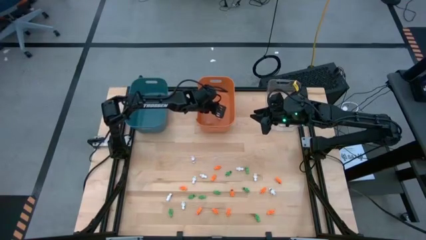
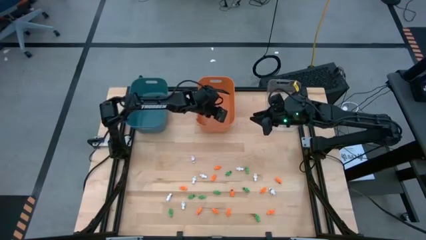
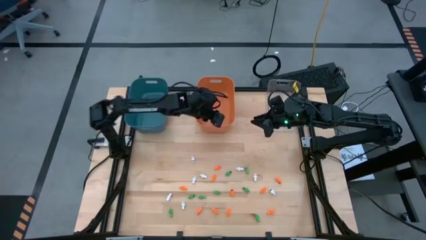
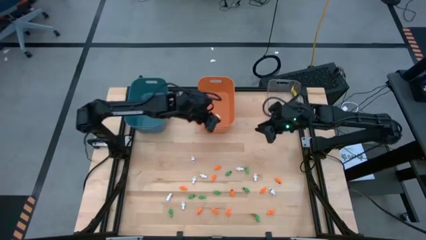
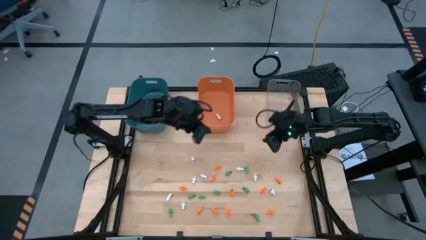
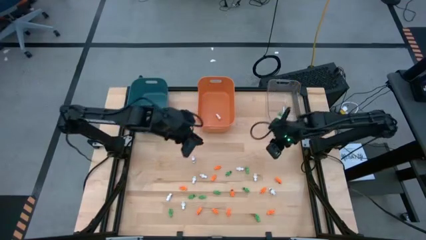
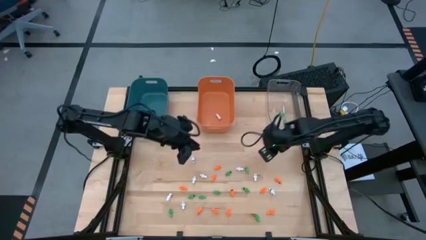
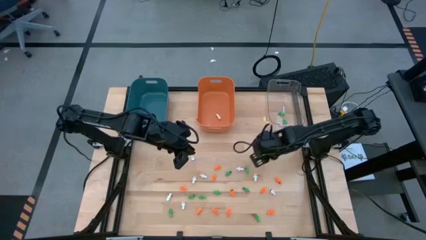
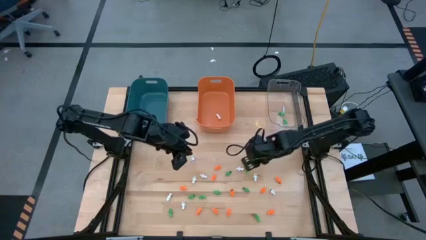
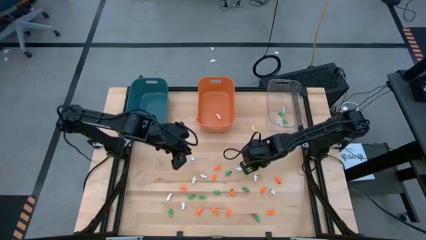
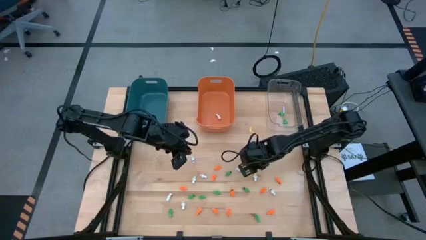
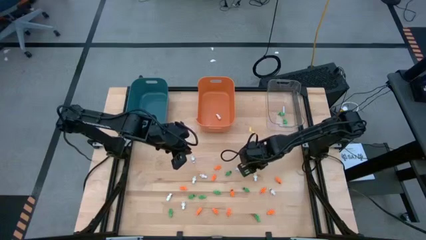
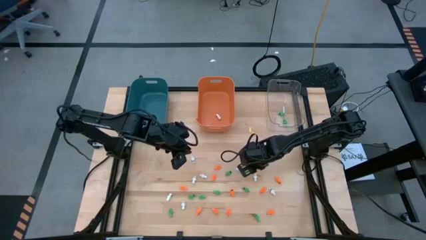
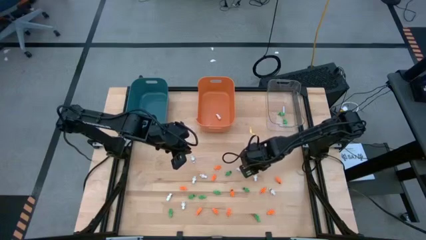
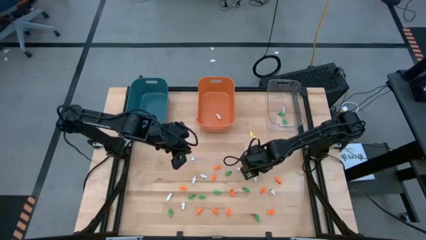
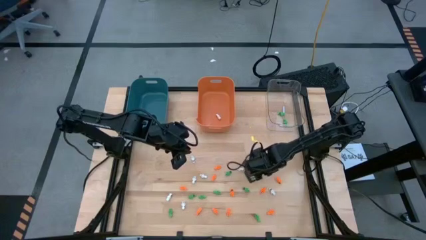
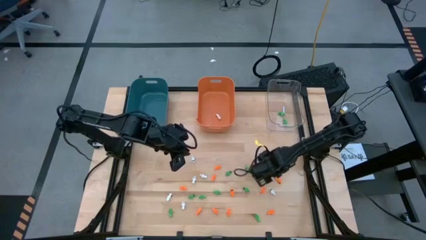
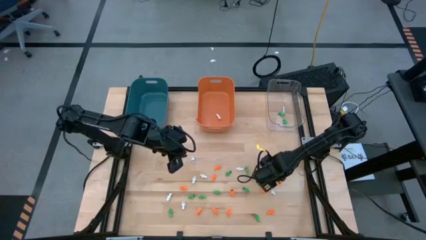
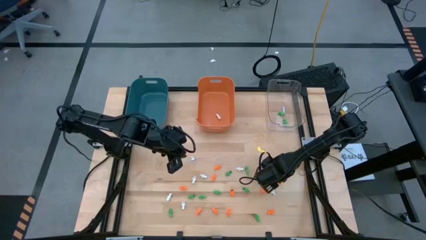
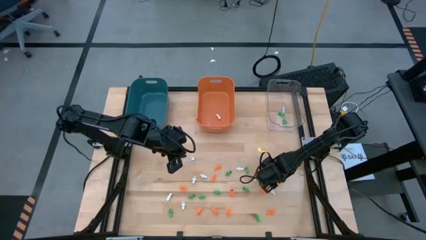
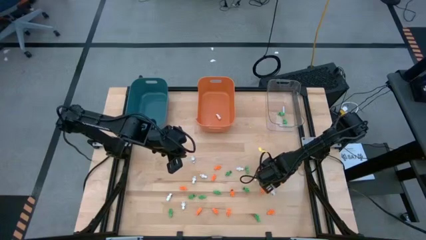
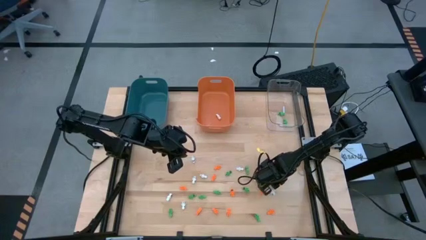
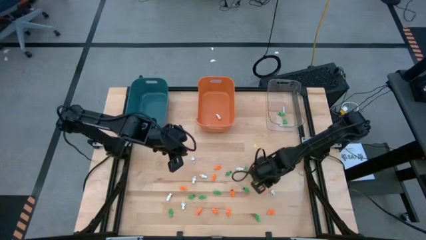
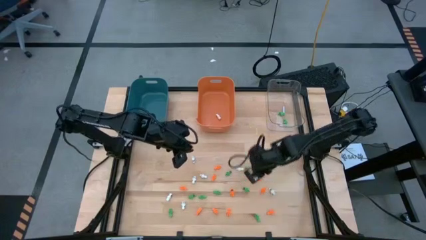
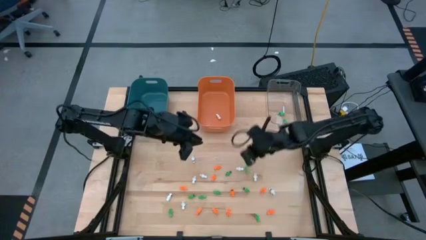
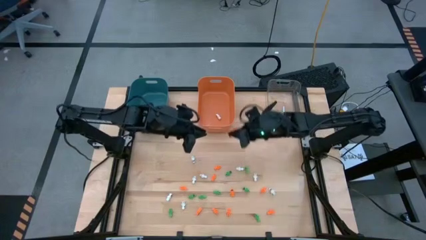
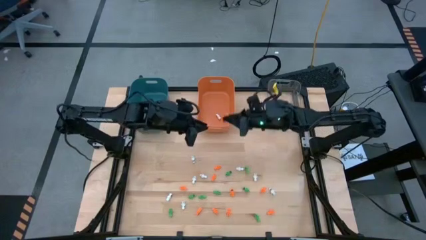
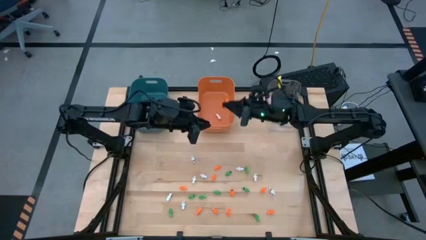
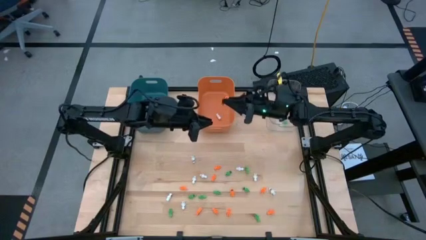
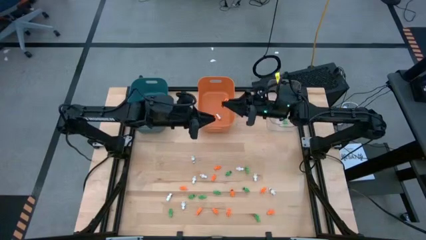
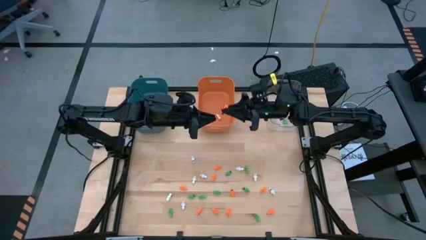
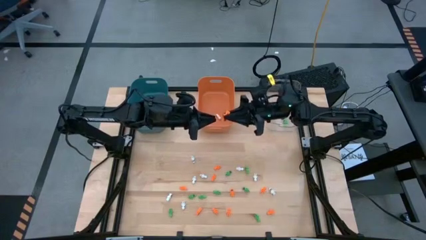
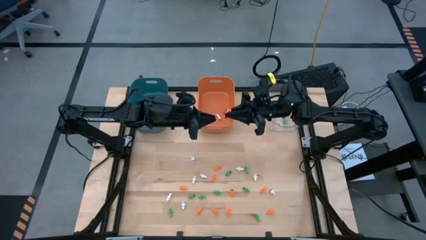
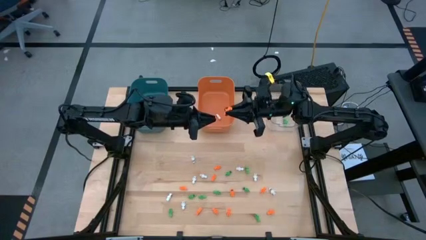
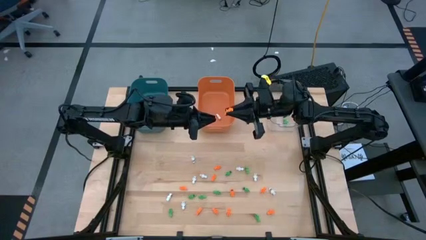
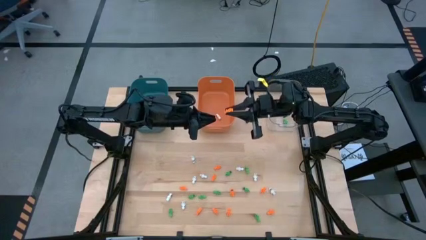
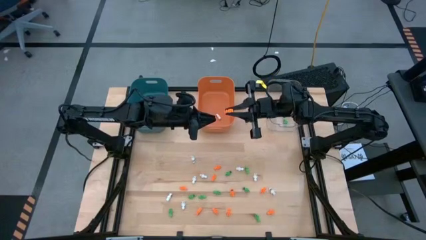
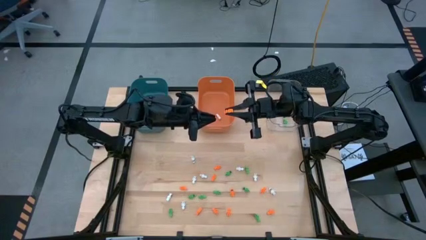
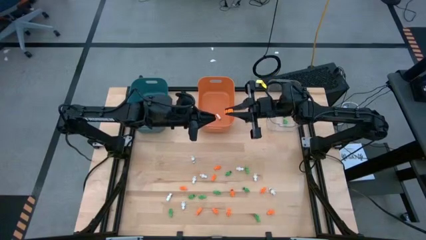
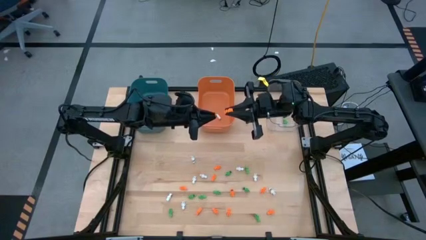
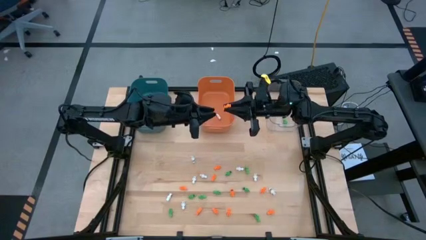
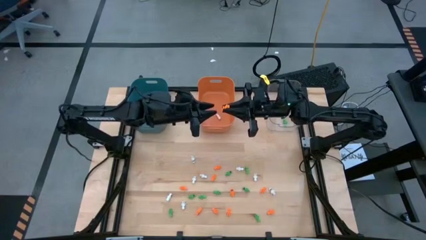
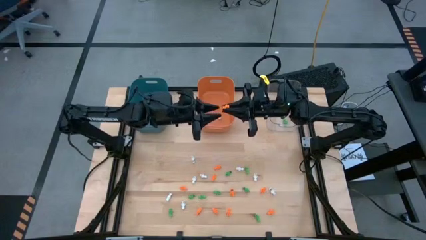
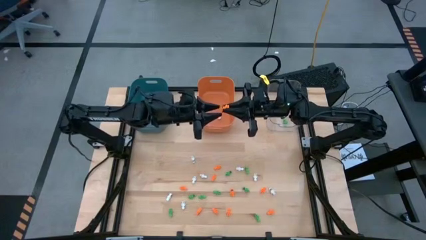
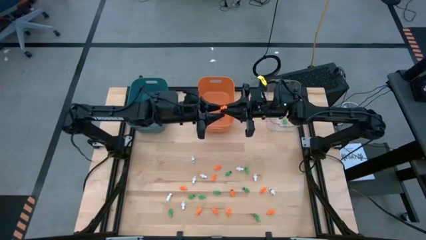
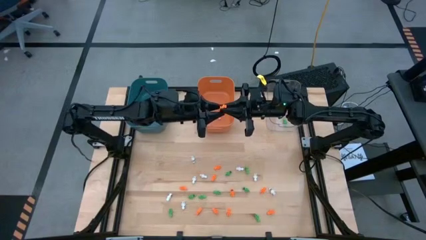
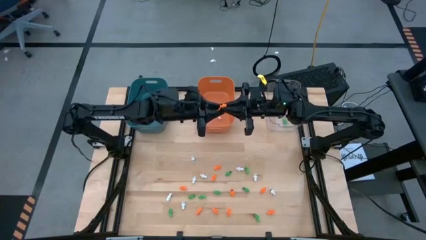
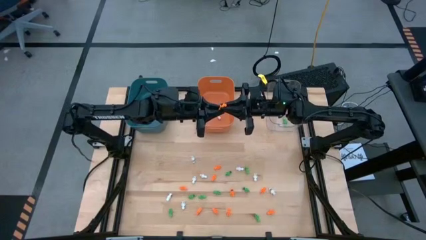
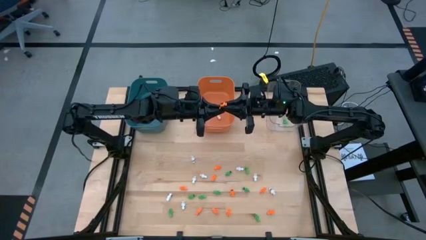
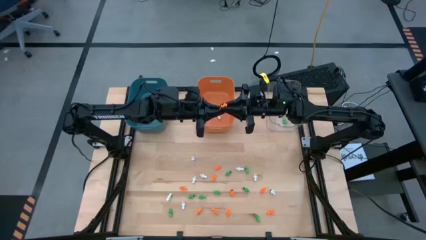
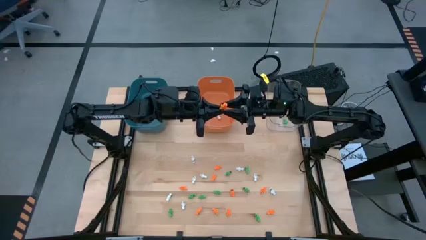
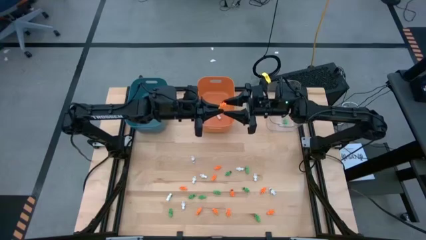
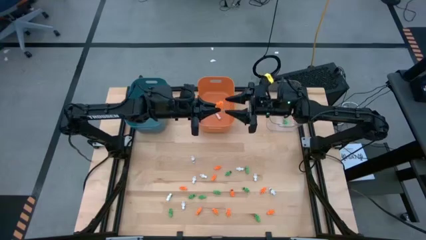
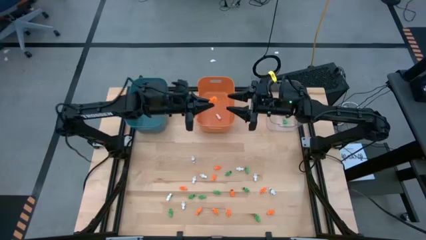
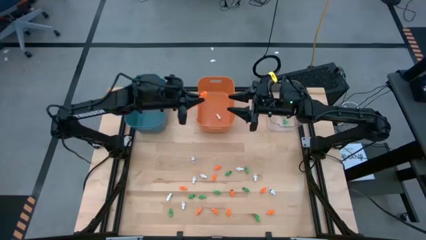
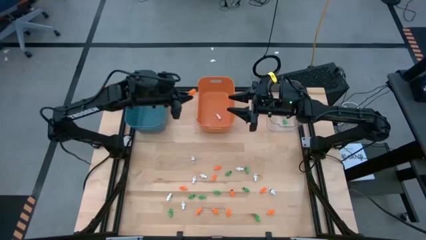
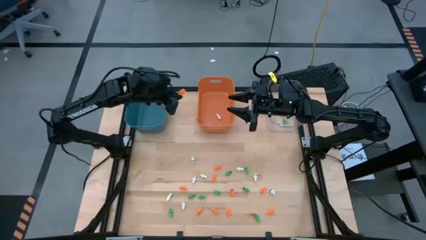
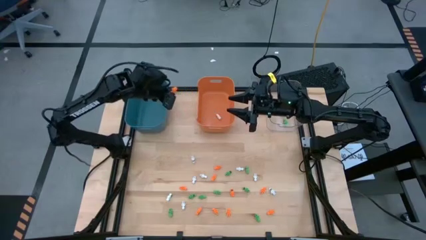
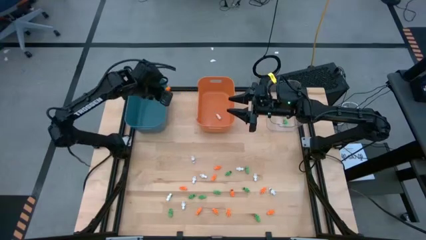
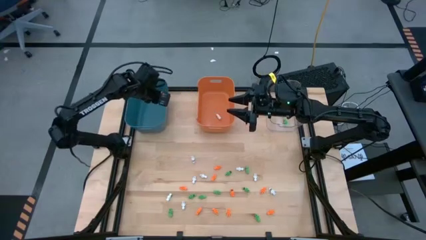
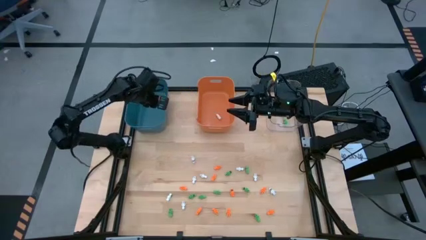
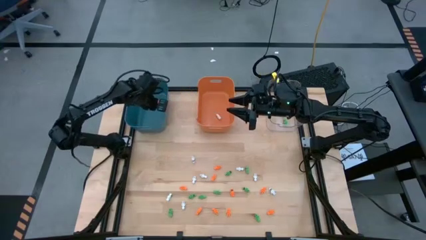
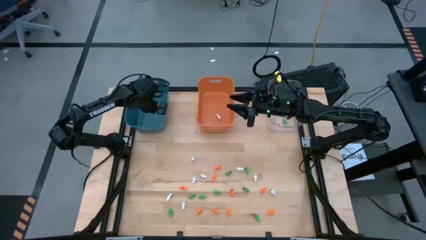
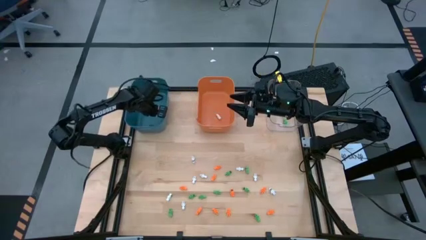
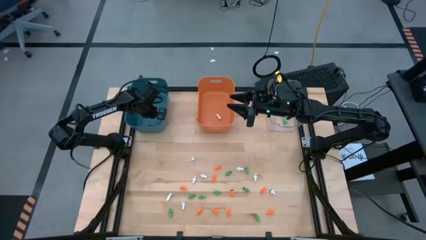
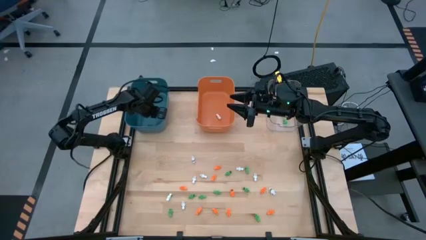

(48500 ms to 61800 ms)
Task: Sort Halloween decoration
Put the orange skeleton toy into the blue bin
